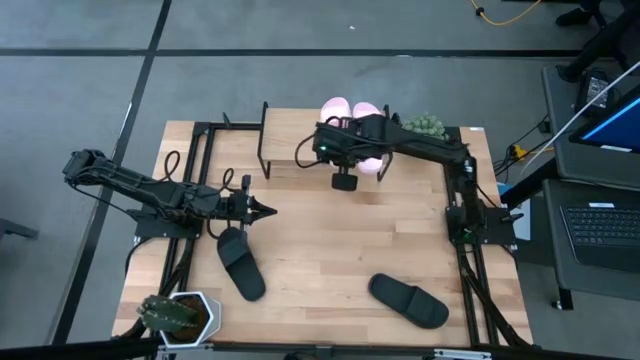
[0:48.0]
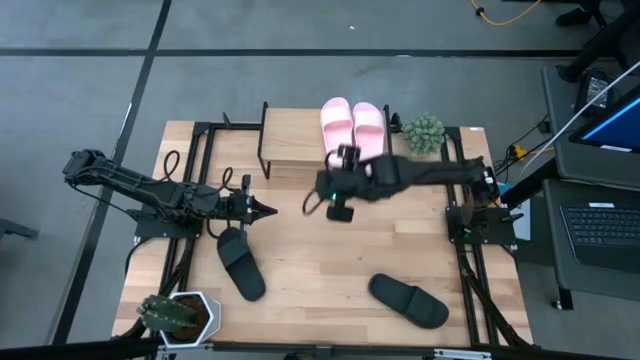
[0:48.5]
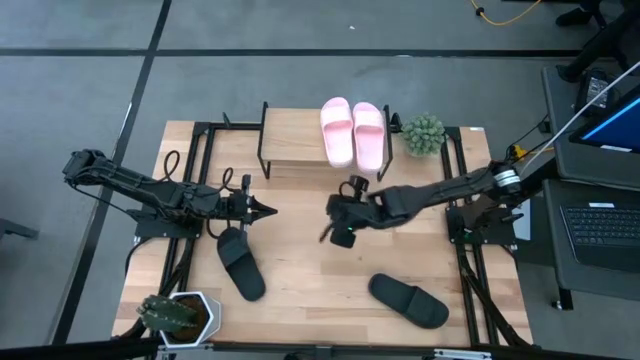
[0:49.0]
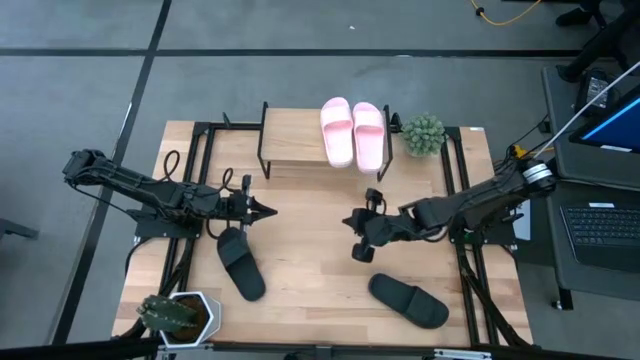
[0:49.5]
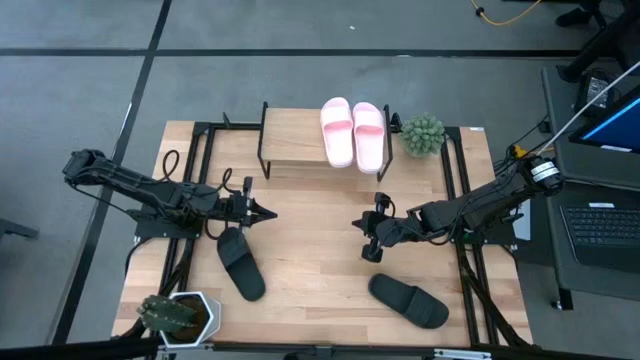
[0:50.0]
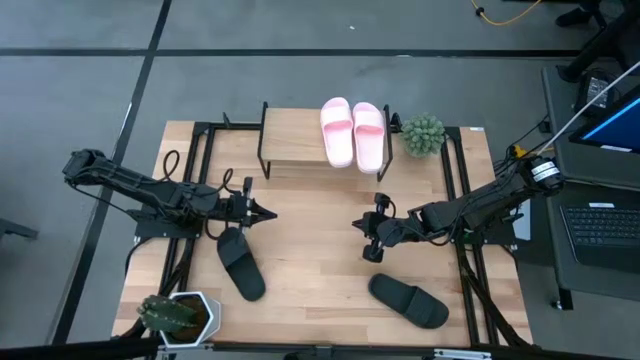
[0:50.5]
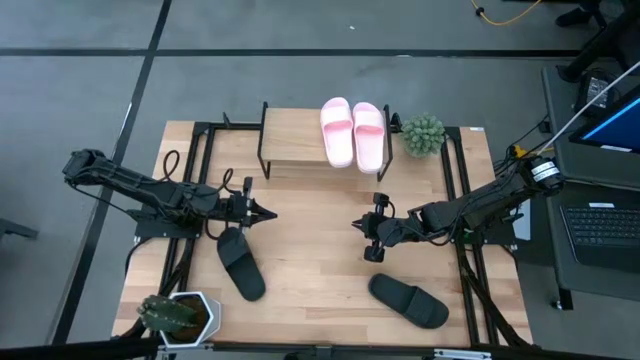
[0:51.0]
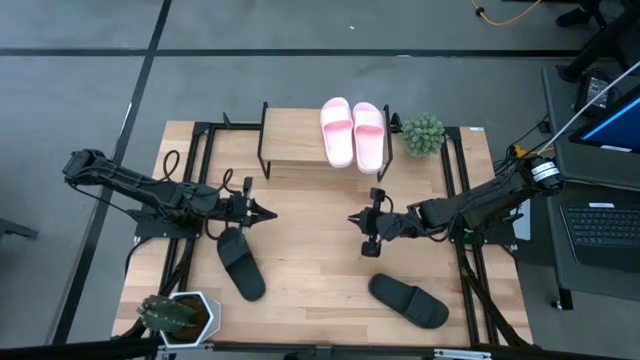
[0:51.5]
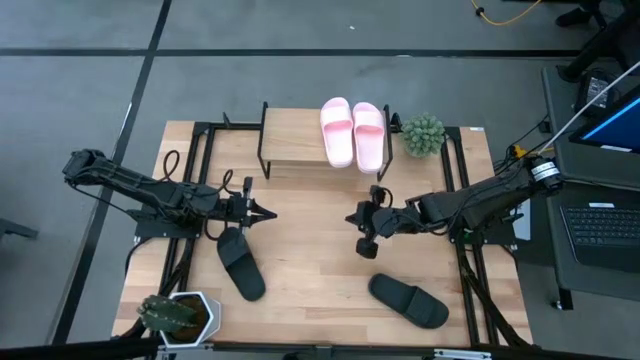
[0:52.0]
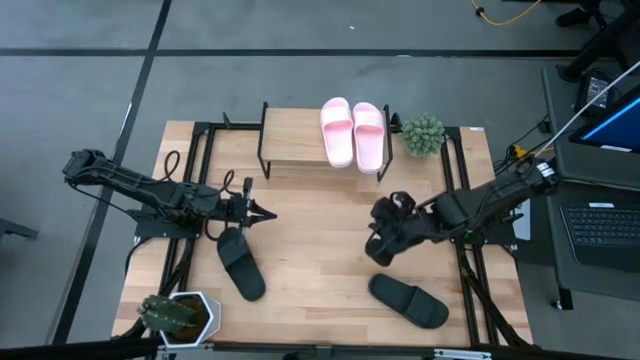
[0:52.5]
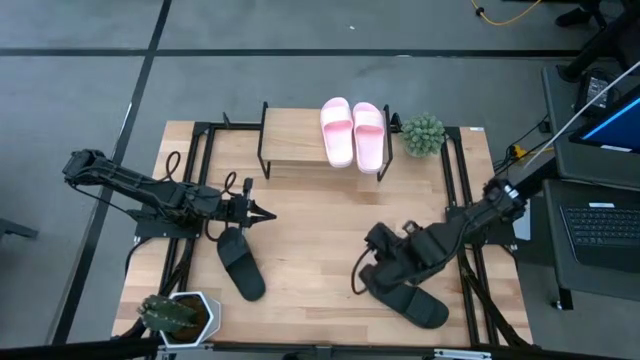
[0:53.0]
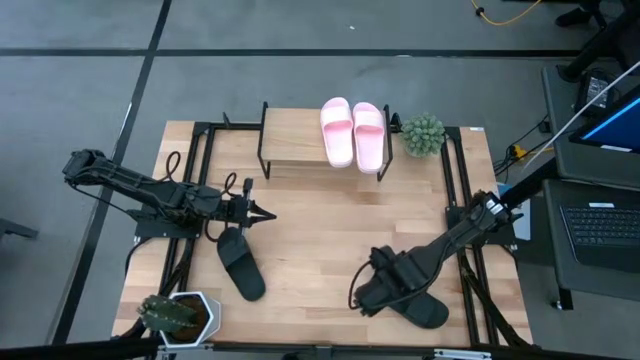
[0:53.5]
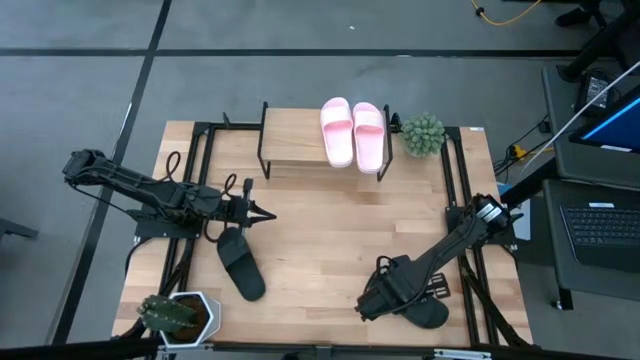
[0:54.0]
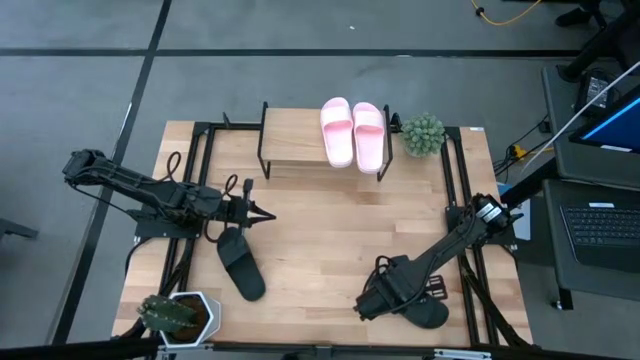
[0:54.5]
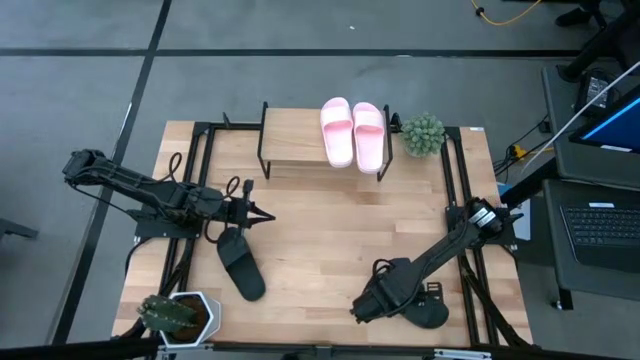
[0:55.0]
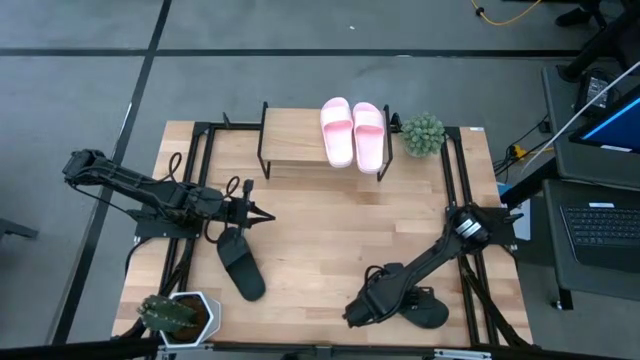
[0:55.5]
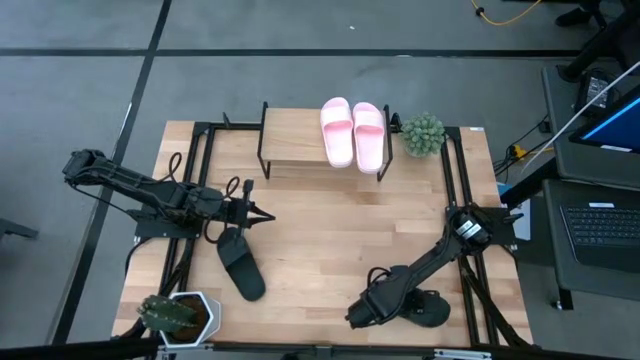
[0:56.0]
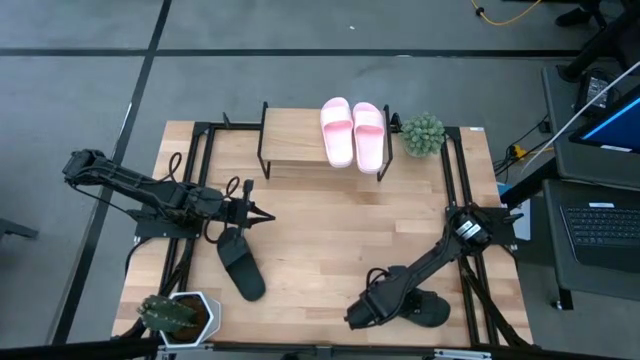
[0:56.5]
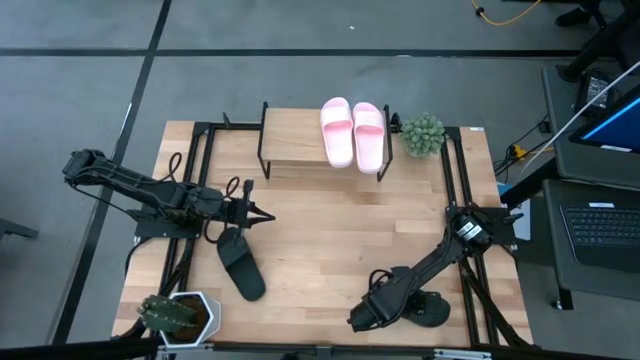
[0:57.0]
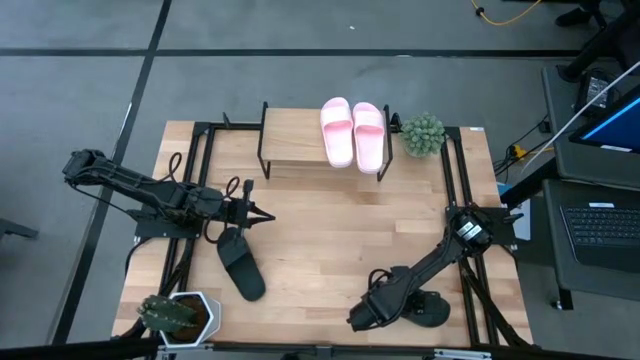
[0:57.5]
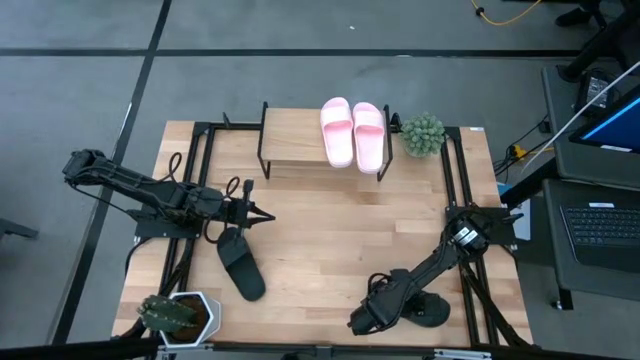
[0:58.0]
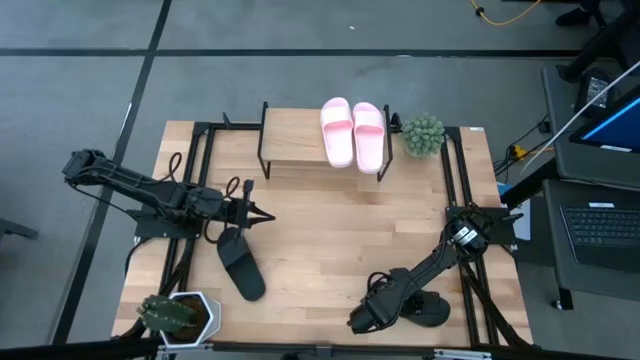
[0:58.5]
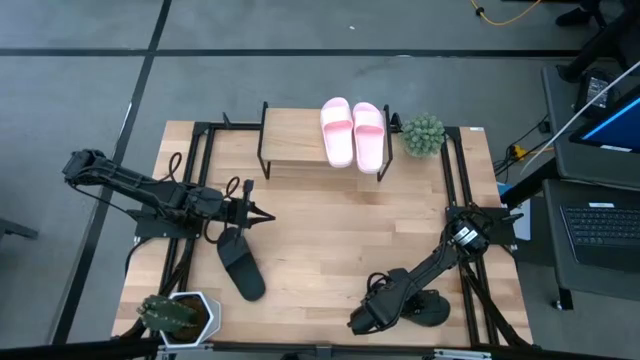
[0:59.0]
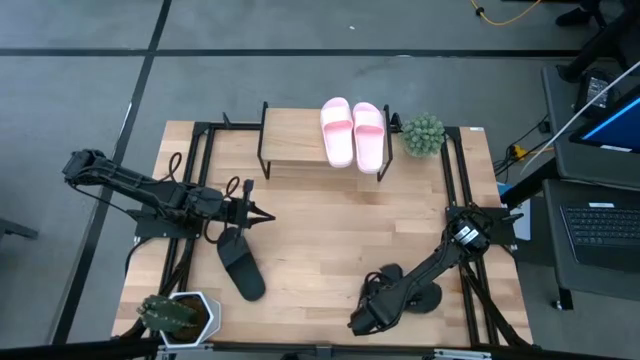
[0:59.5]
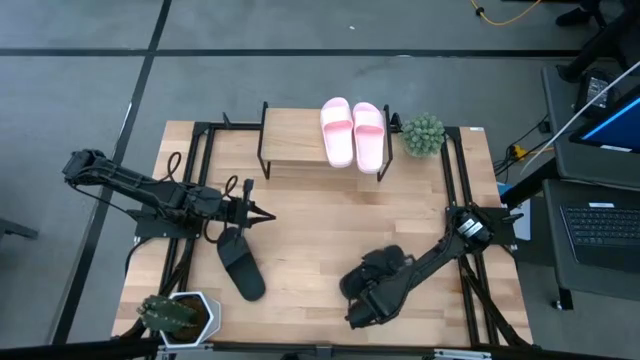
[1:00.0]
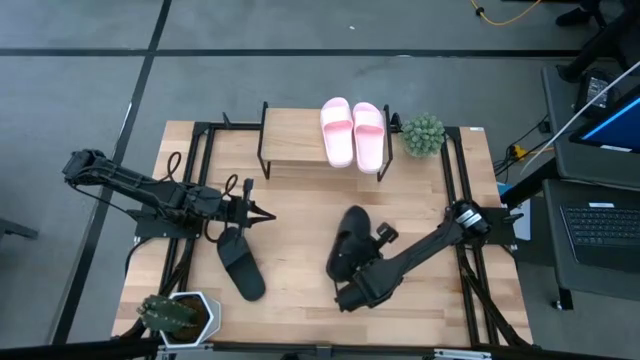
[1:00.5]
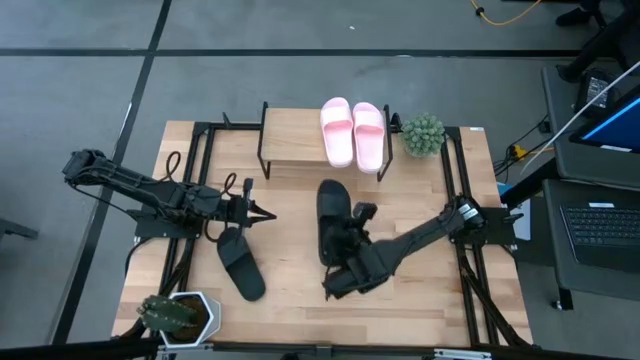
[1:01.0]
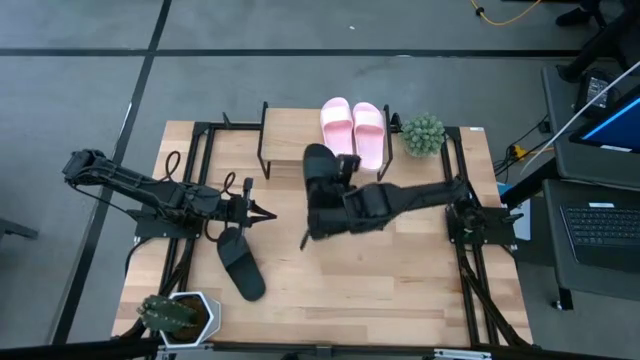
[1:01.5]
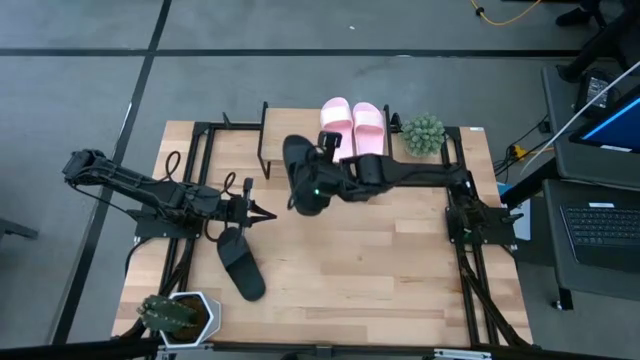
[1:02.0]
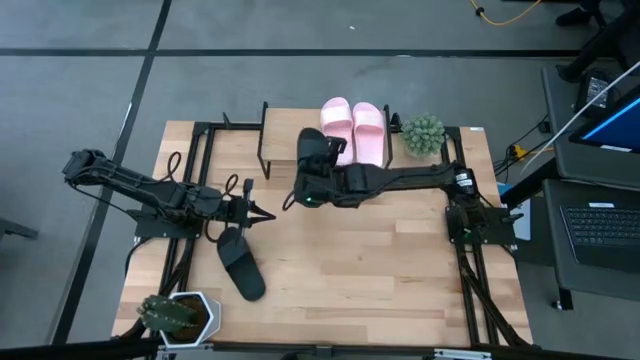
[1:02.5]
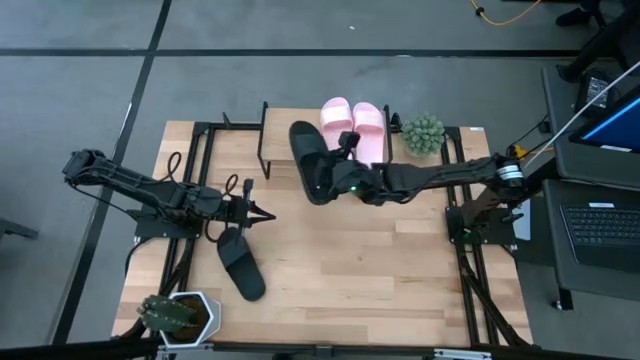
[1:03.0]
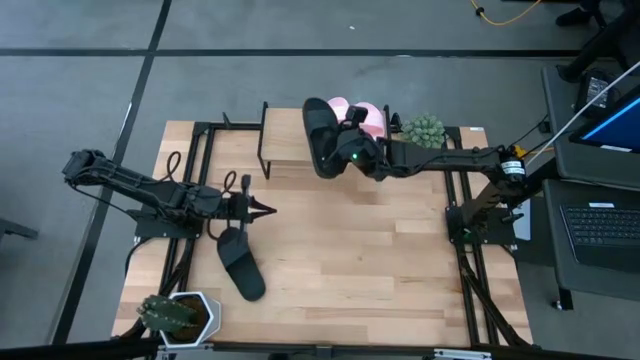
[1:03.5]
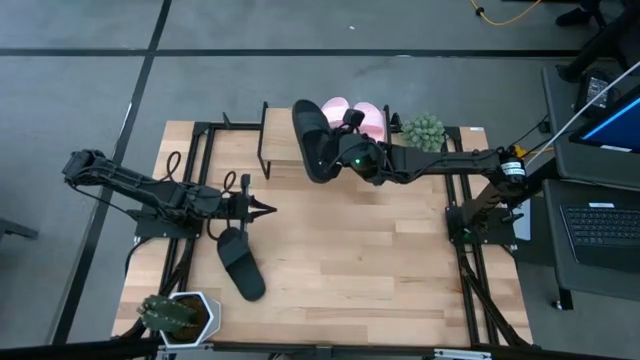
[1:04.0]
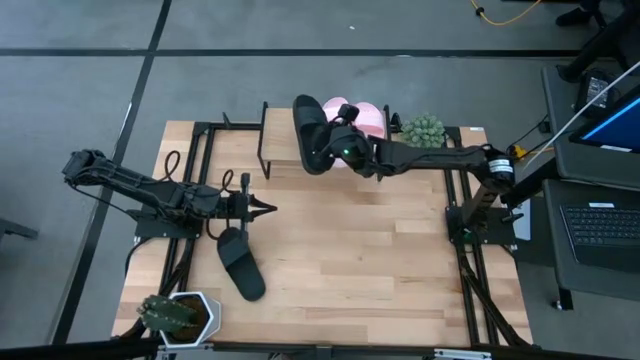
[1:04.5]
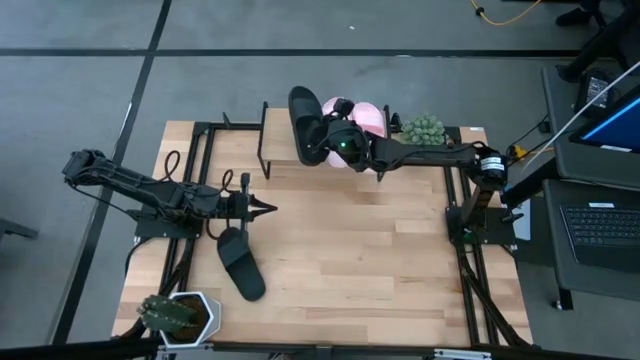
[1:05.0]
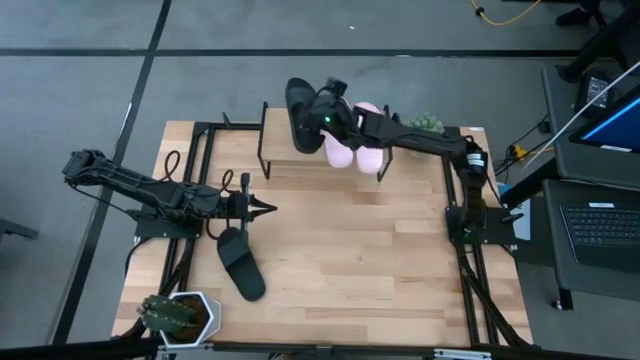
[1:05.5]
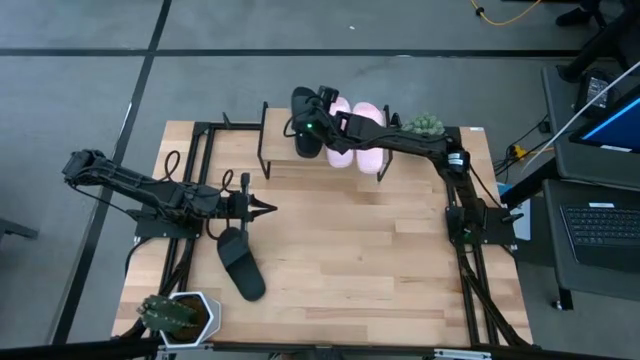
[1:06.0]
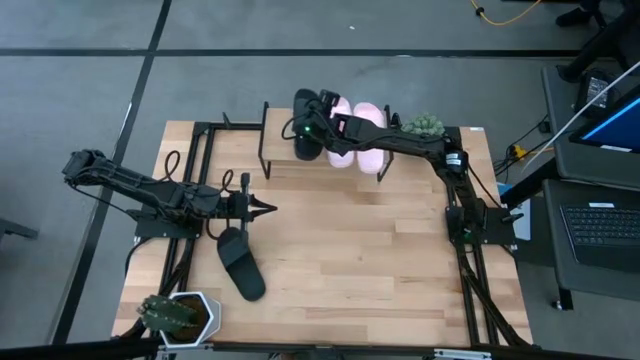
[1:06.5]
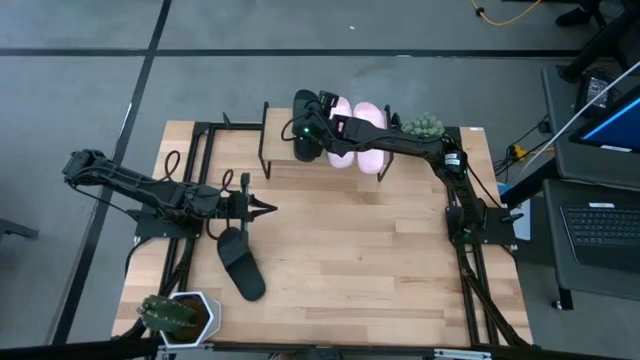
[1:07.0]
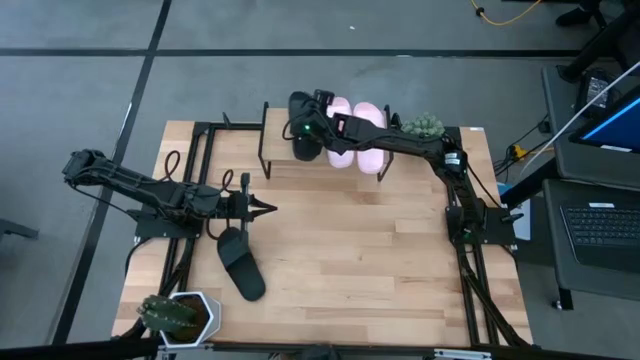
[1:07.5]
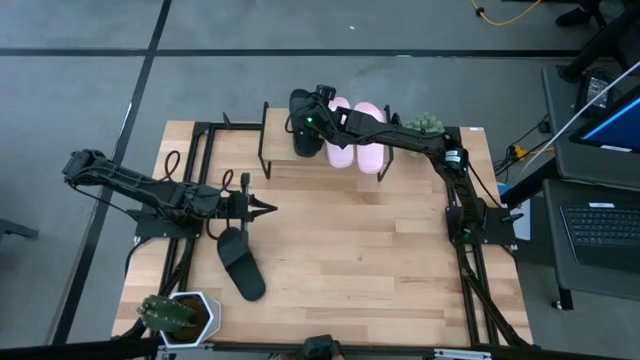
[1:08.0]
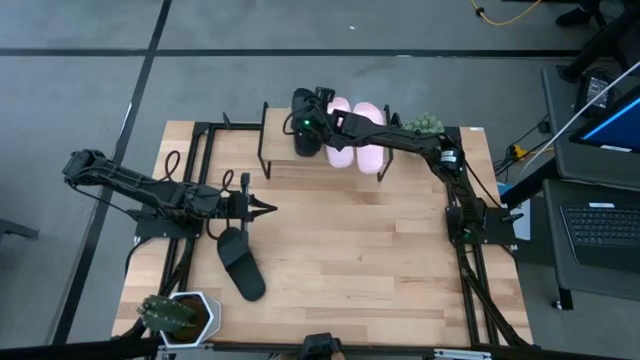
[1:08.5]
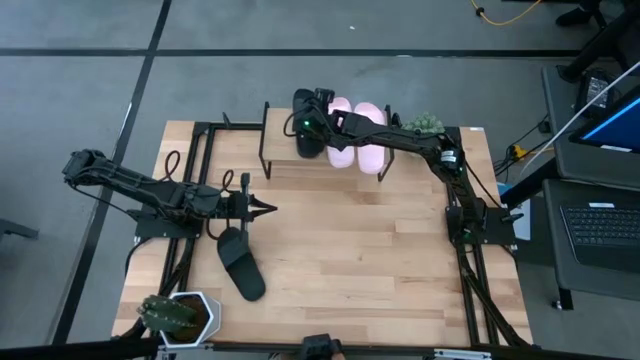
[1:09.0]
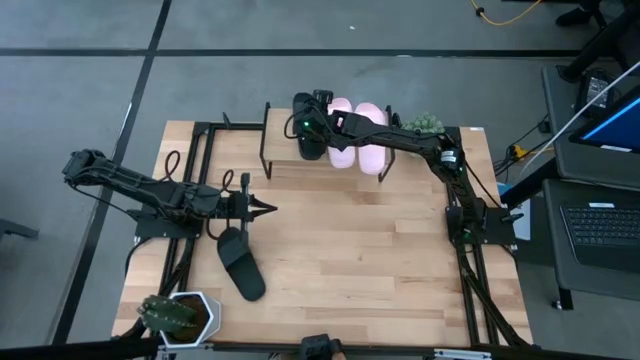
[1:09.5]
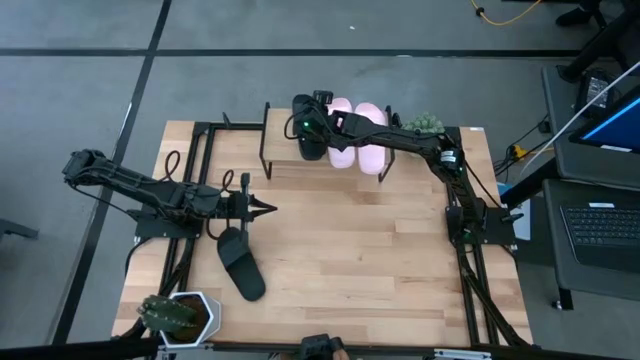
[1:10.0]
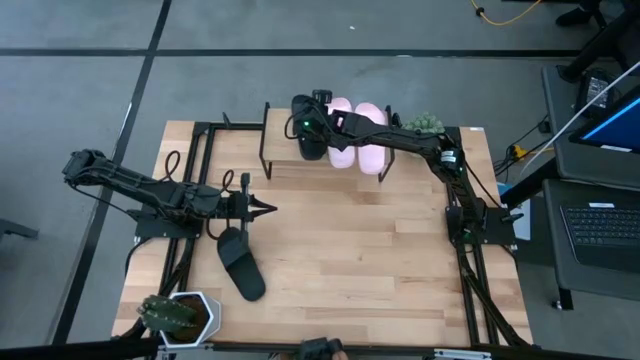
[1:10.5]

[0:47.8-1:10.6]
Task: Pick and place slides into the shelf
Put the right black slide on the shelf
